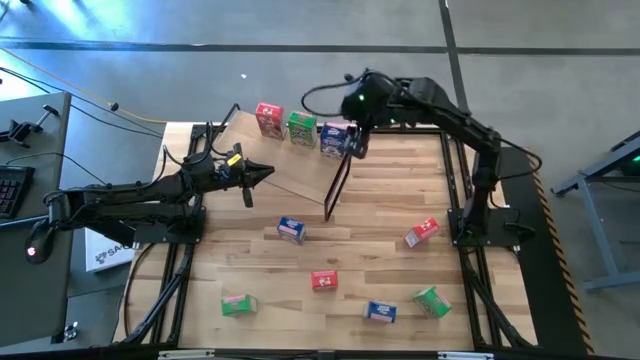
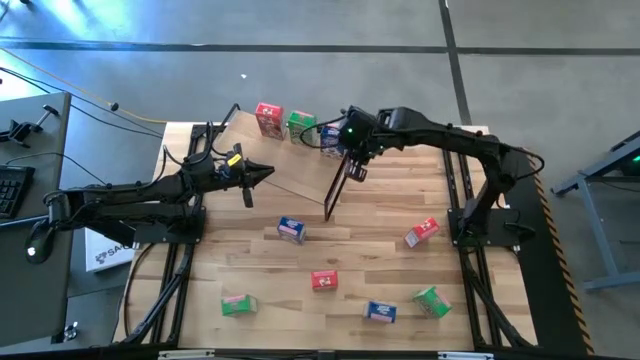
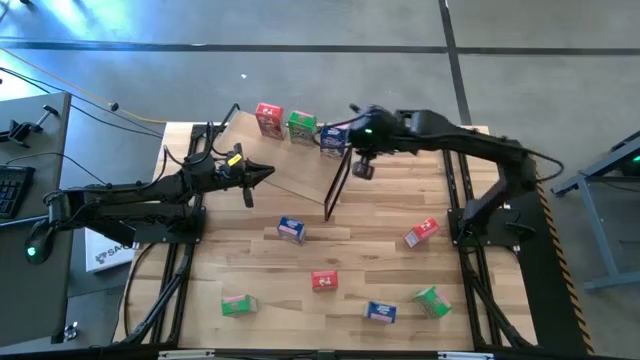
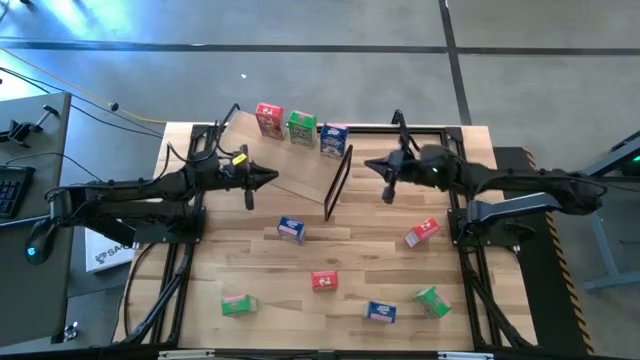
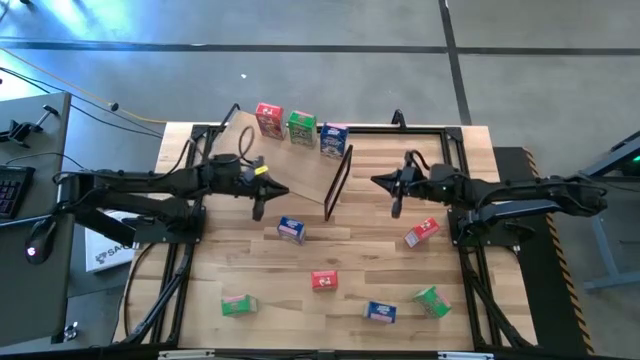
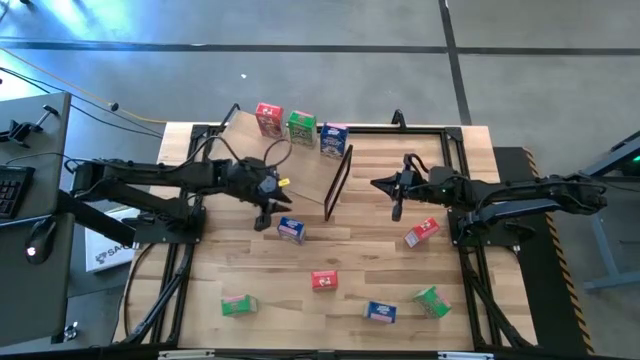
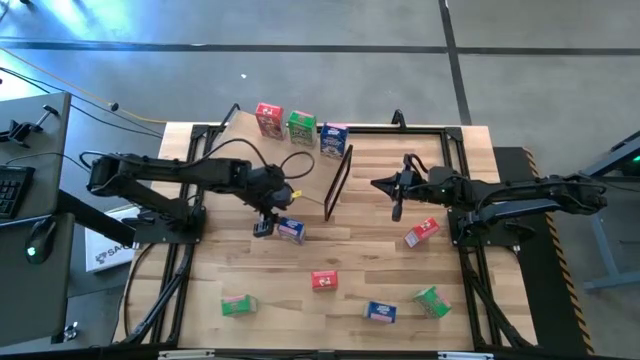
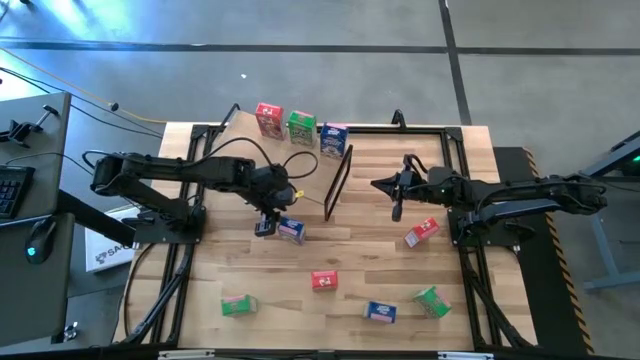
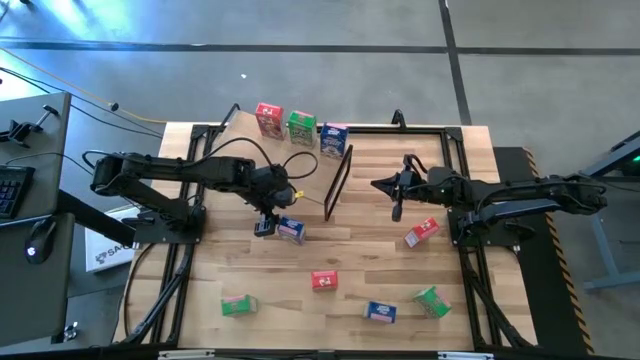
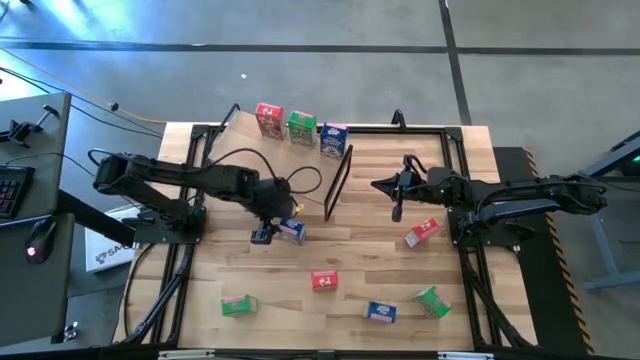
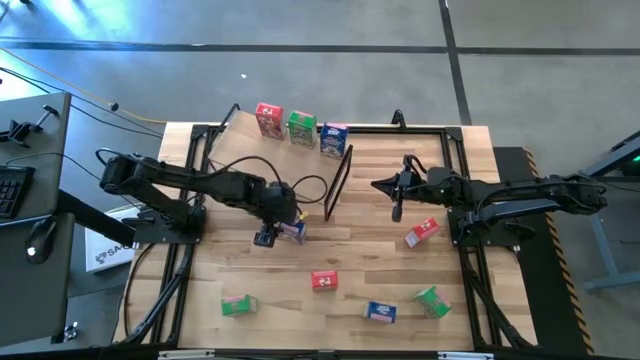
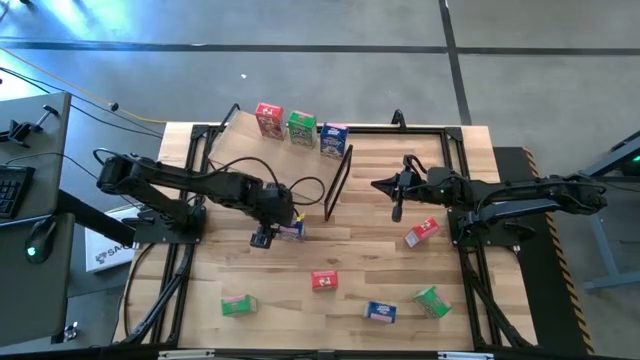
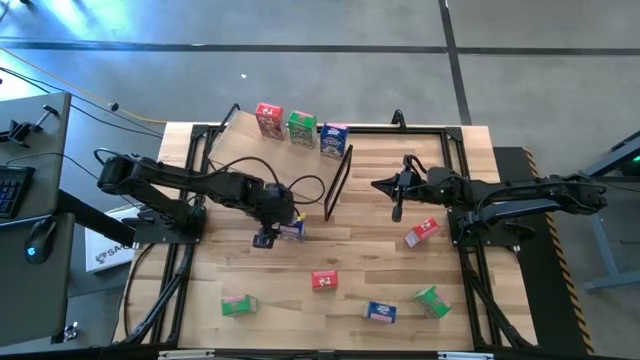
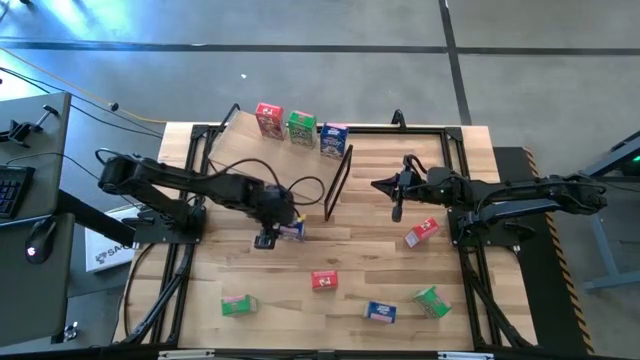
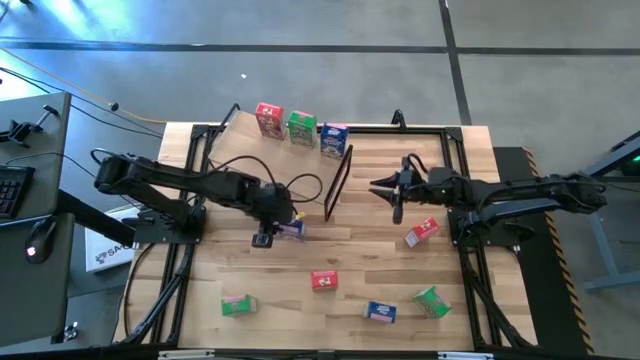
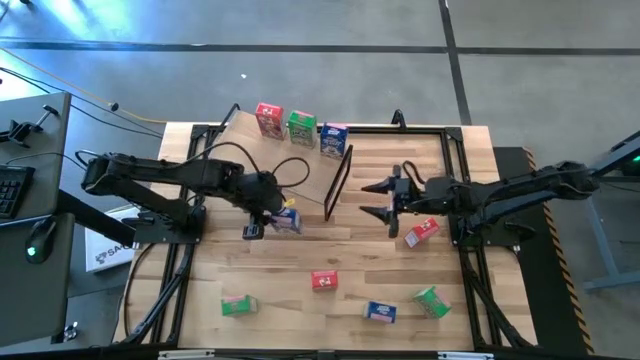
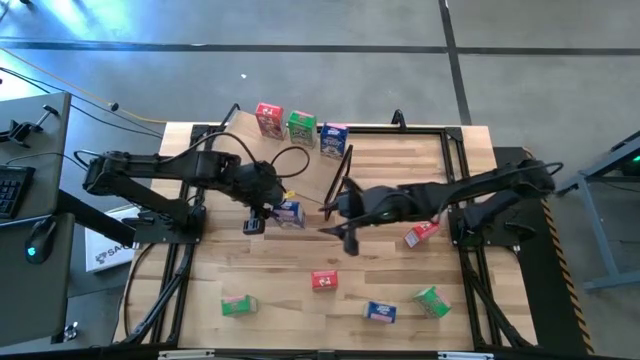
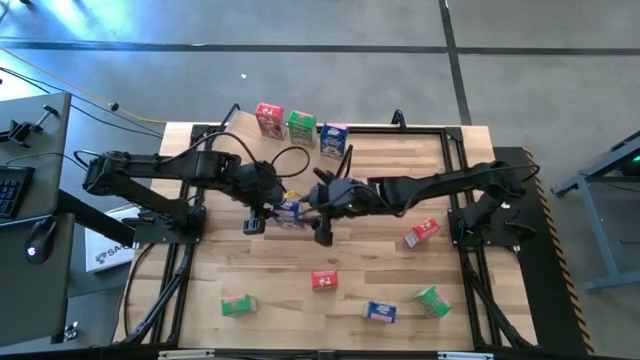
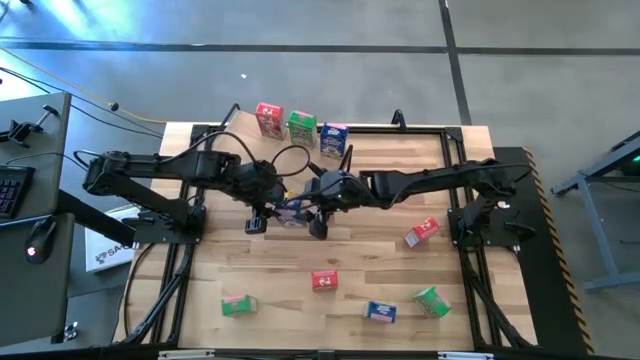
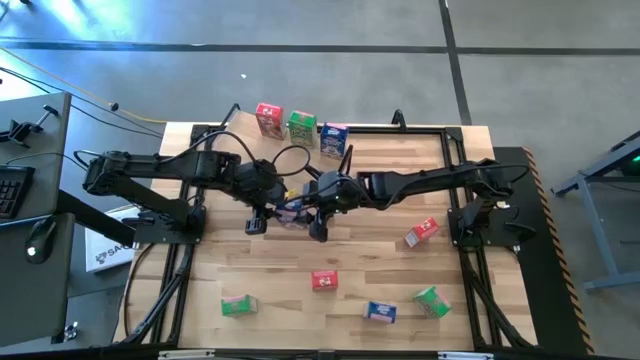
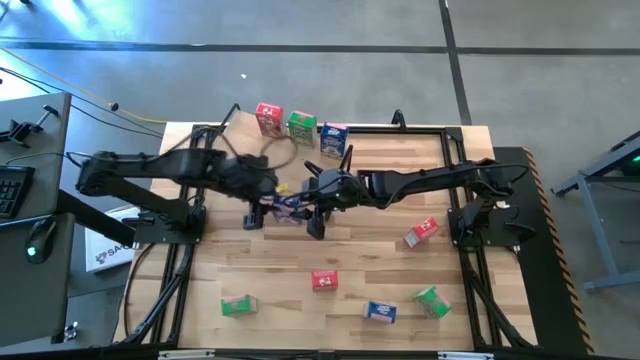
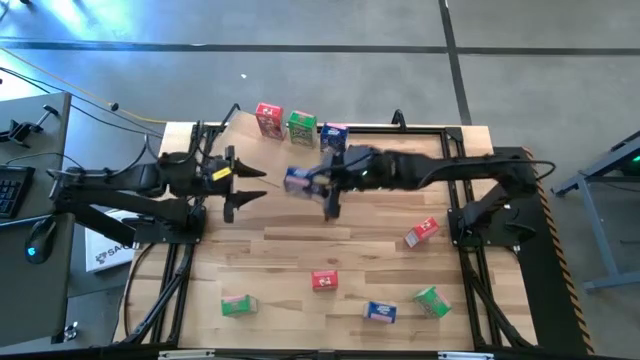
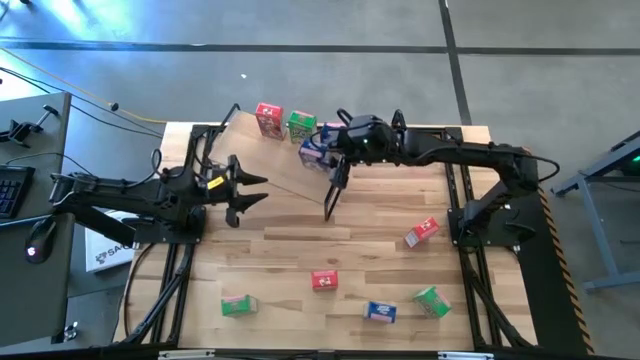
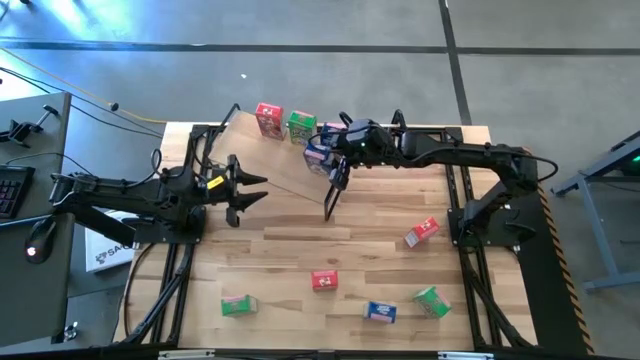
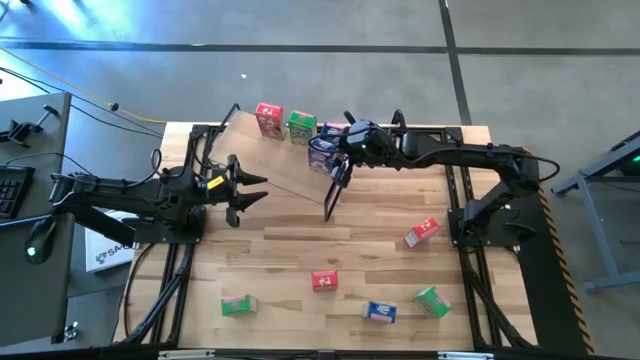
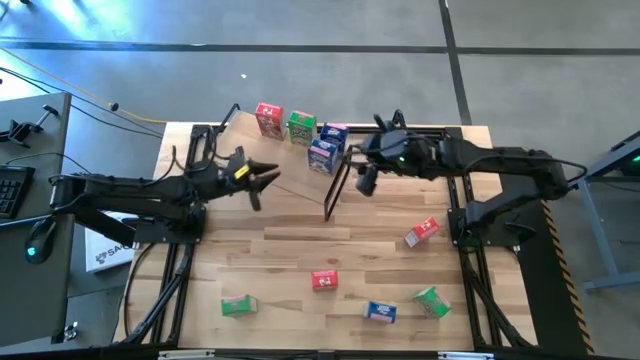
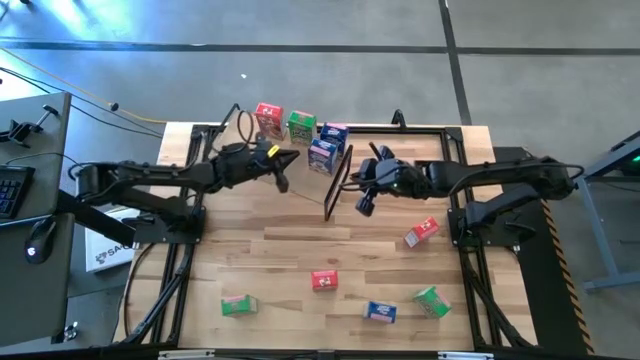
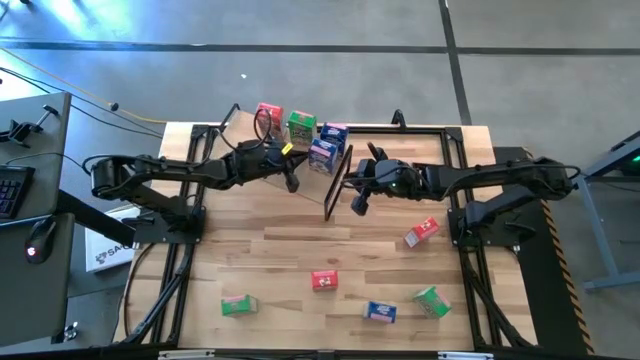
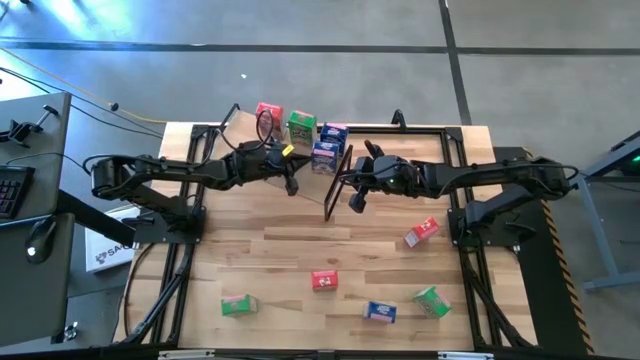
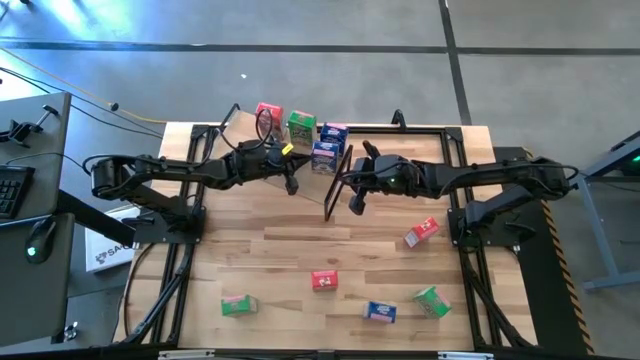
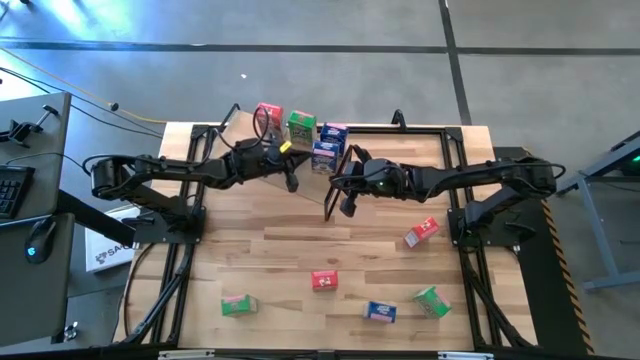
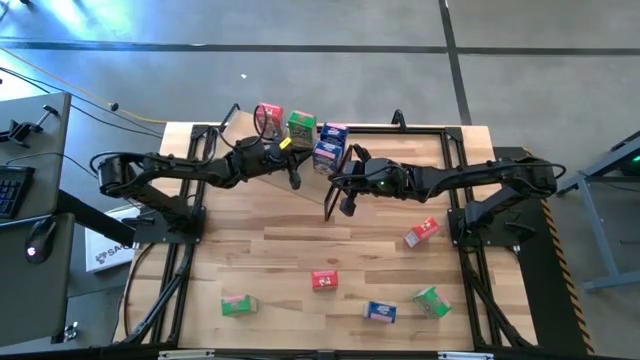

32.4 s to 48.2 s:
Task: Stack cereal on shelf
Put the top blue cereal box on the shelf aligned with the other blue cereal box

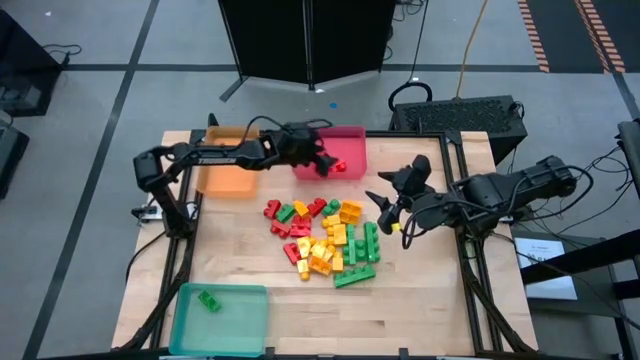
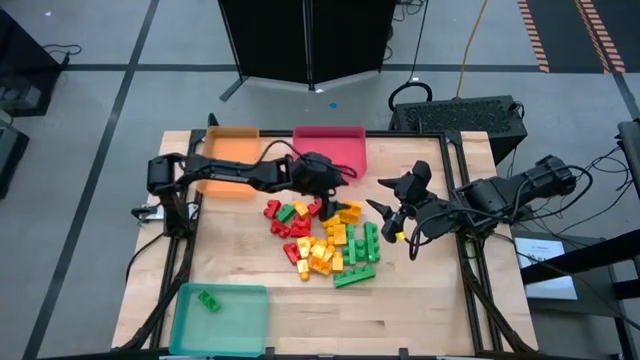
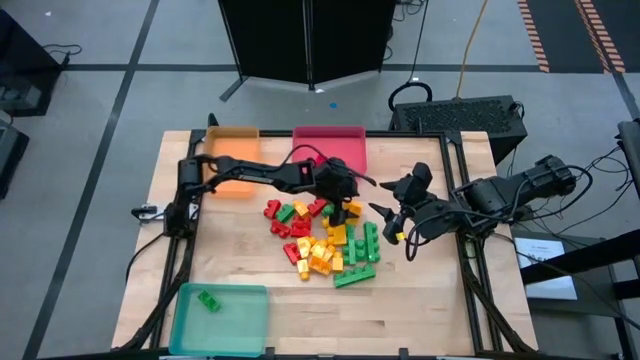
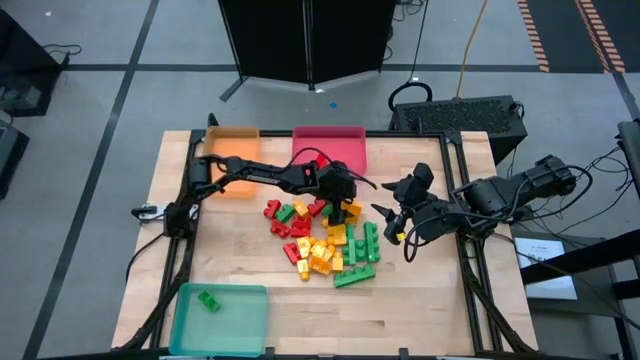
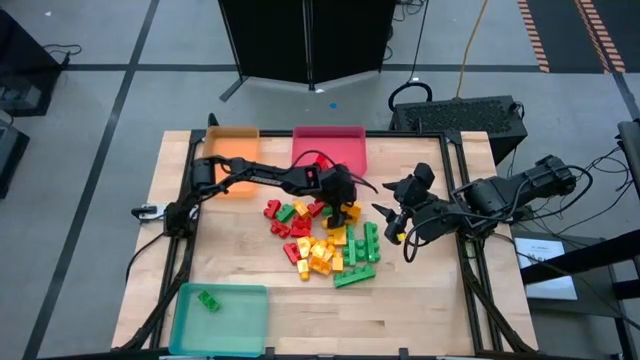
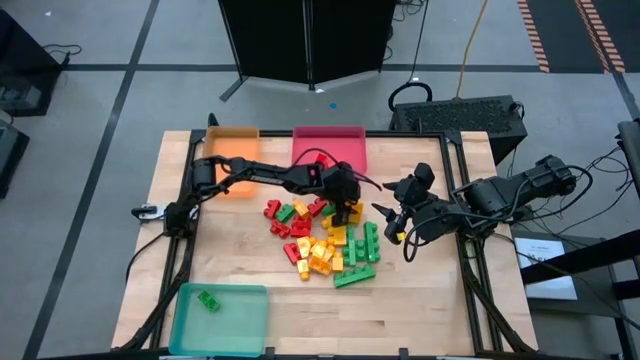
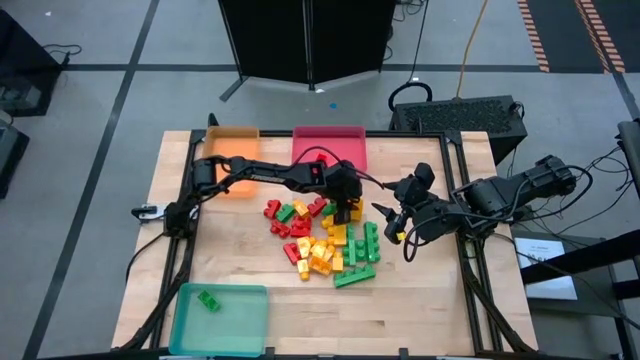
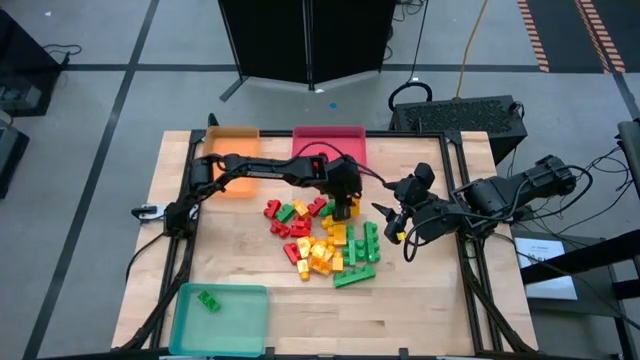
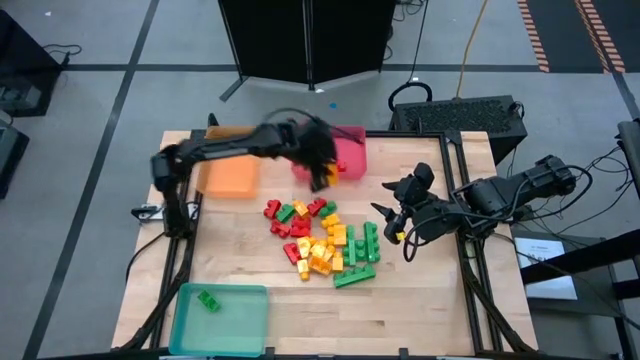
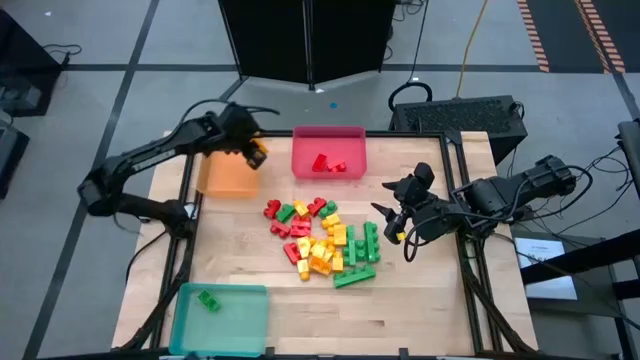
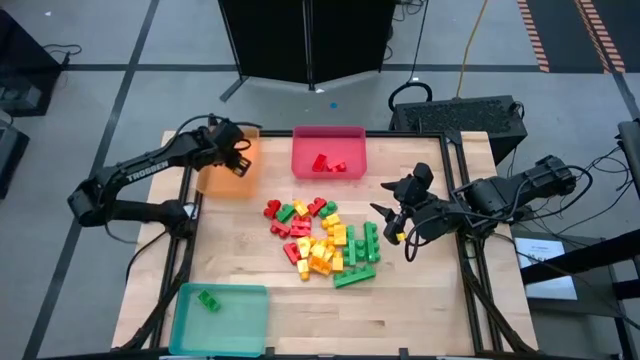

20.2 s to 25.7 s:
Task: Sort blocks
Put the yellow game piece into the yellow bin
